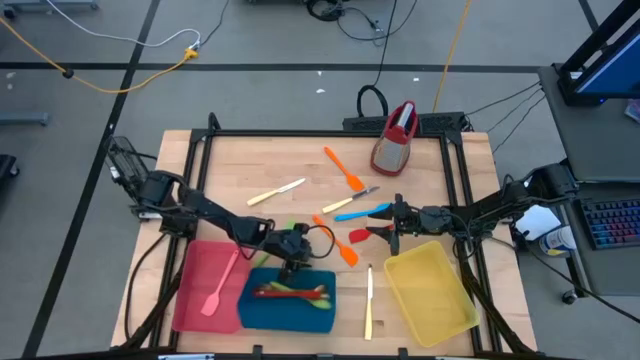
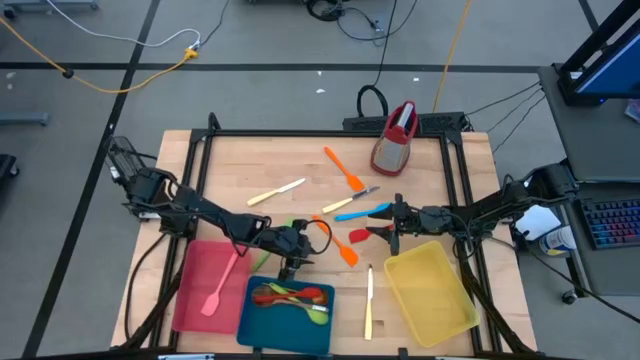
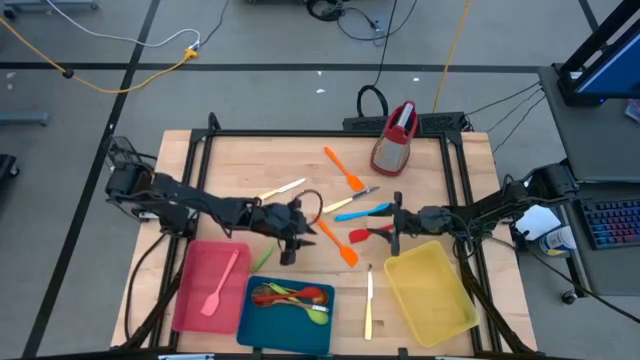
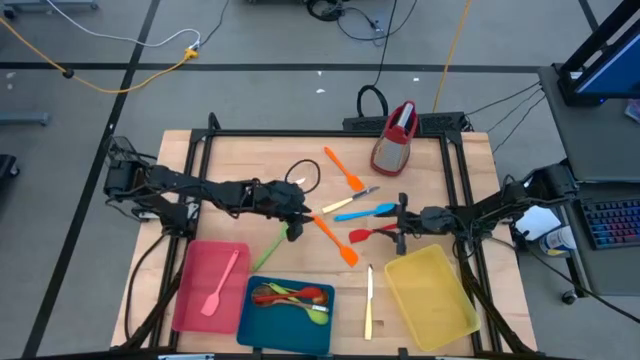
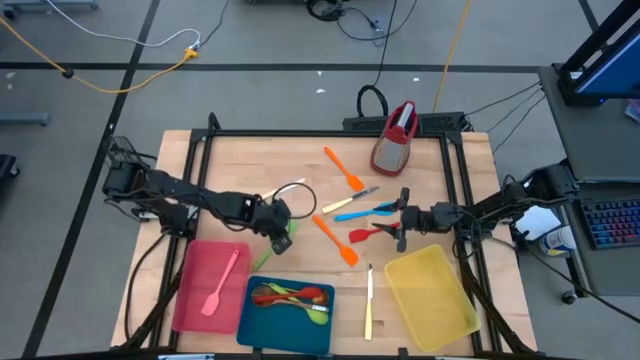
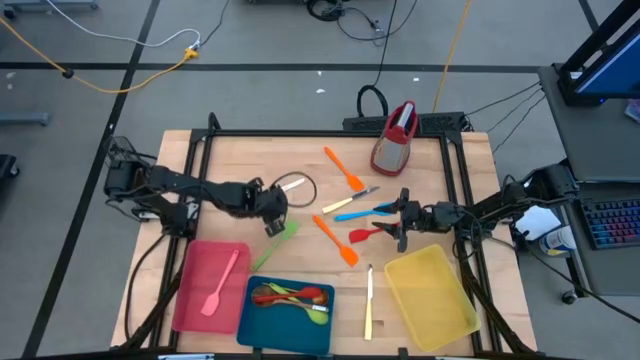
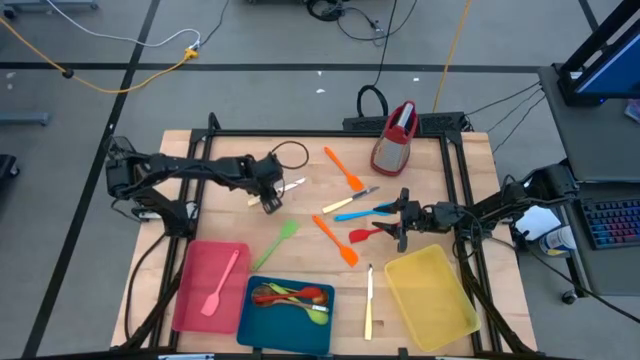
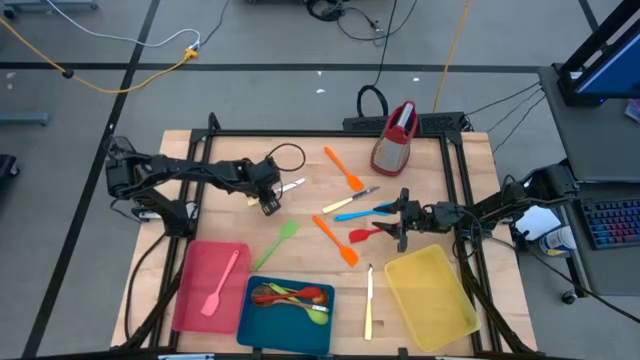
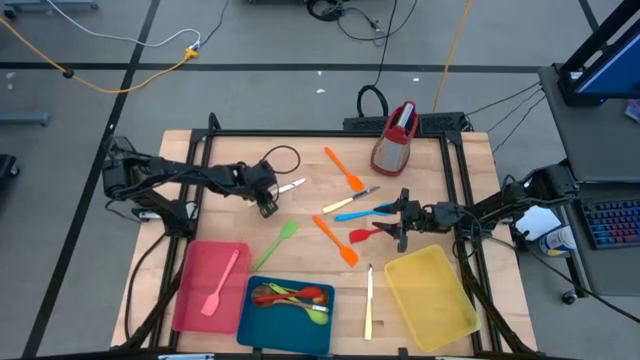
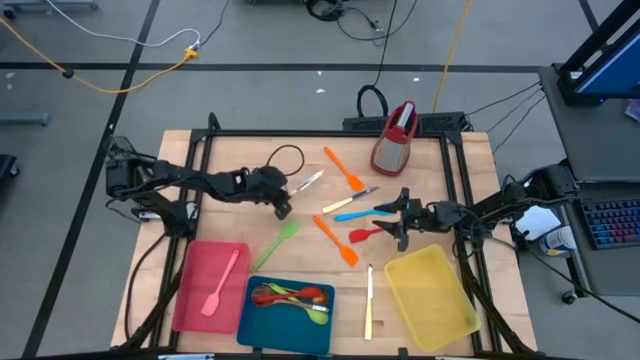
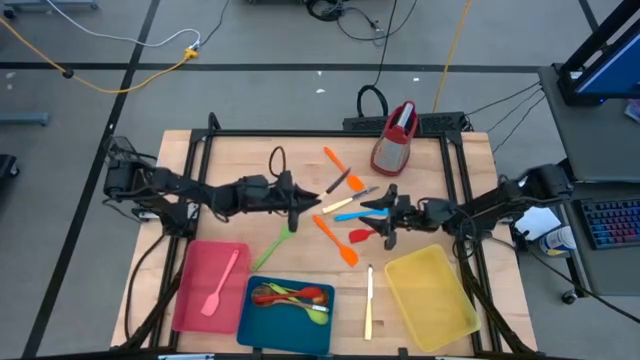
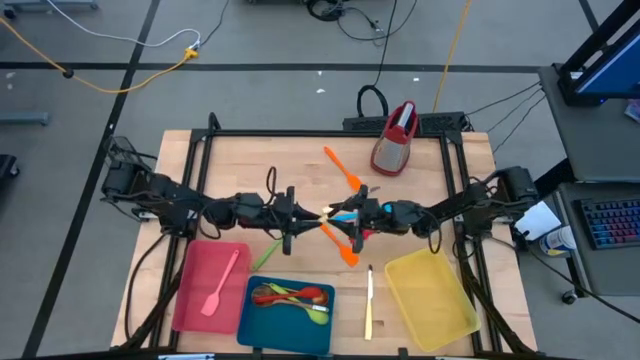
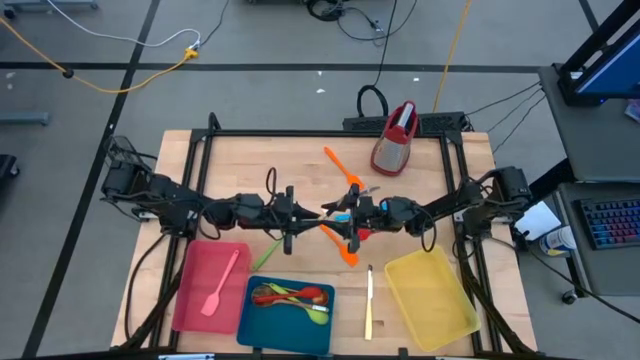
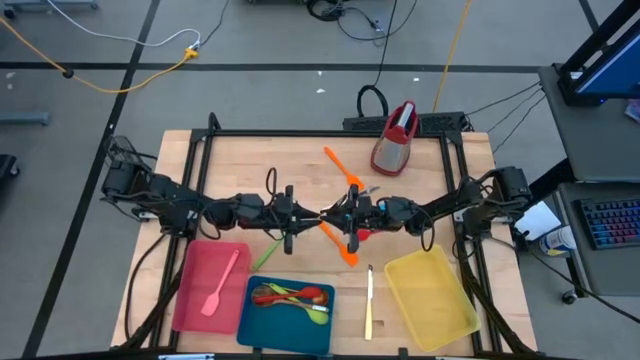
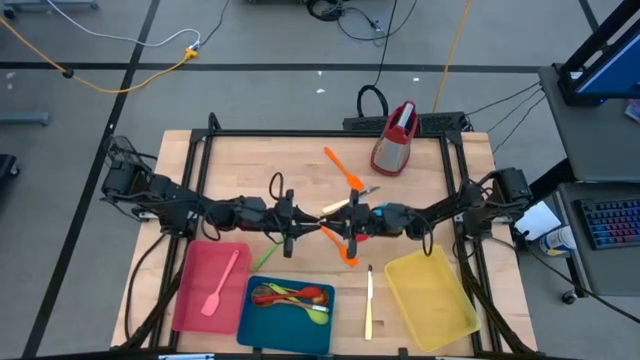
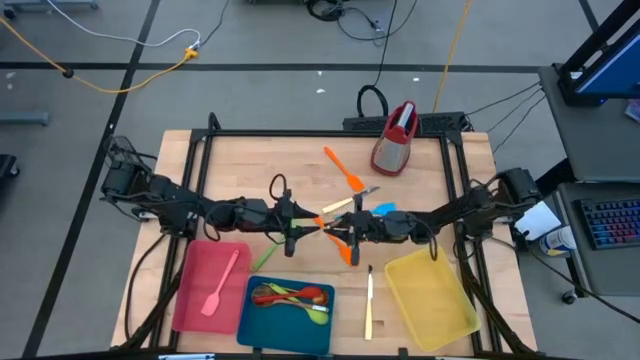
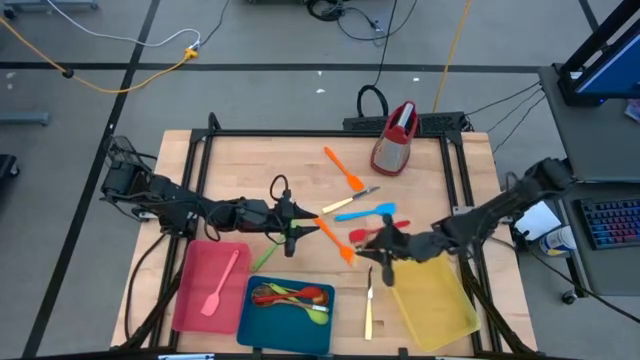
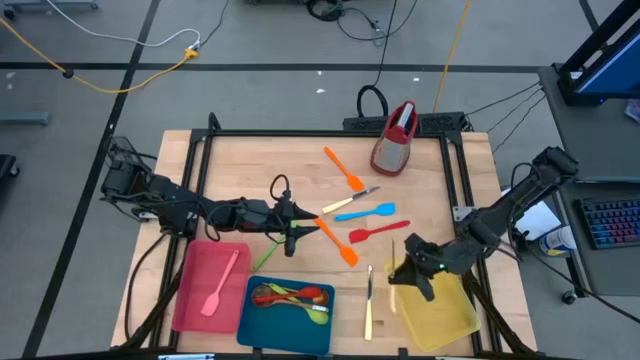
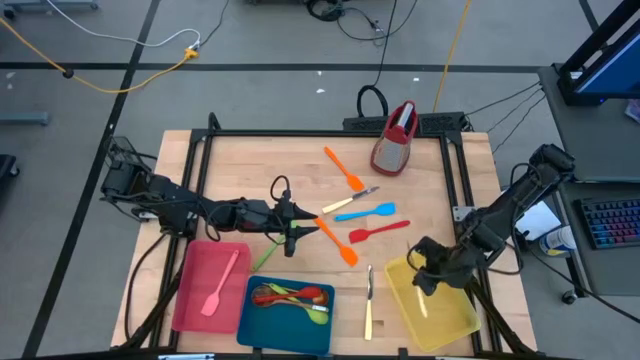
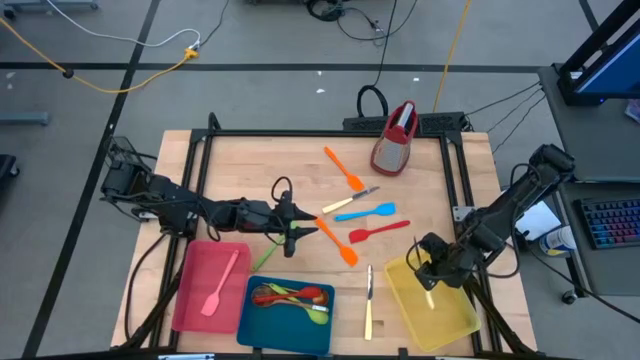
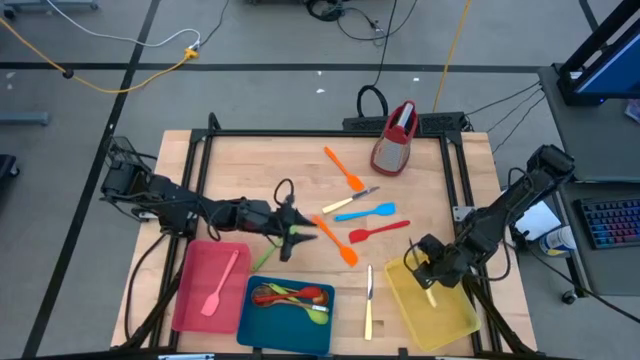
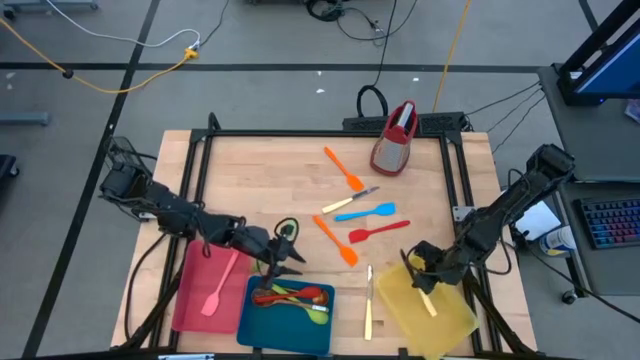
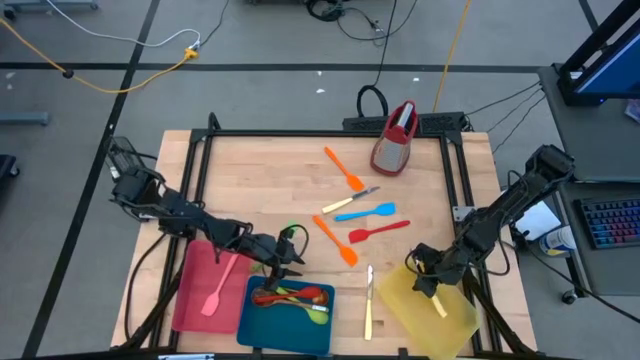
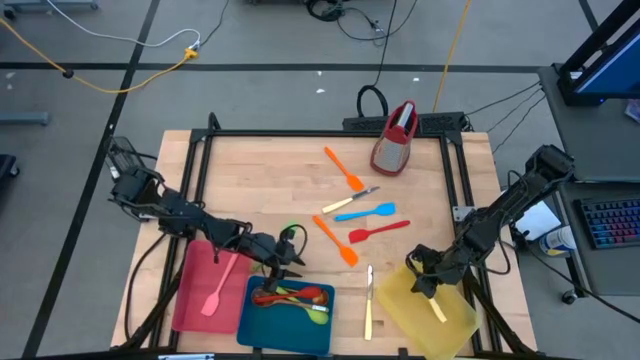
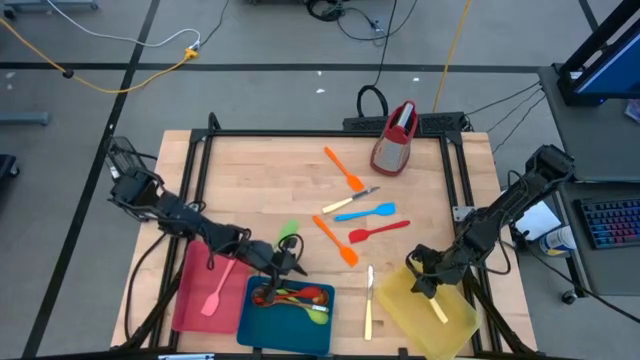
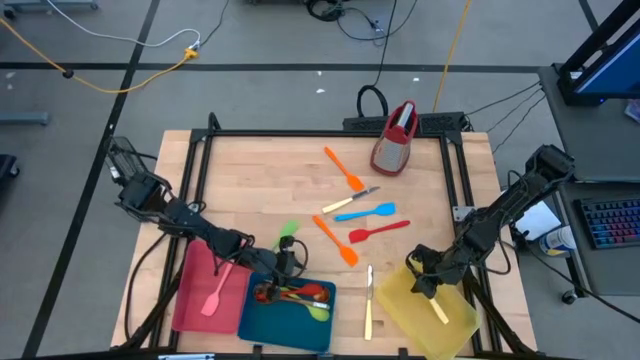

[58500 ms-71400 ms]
Task: Pick & Place Kitchen Items
Put the yellow table knife into the yellow bin

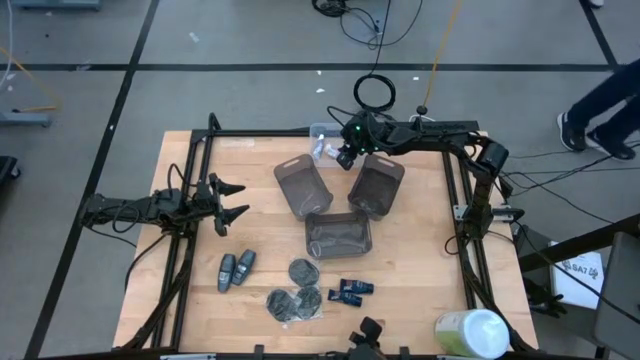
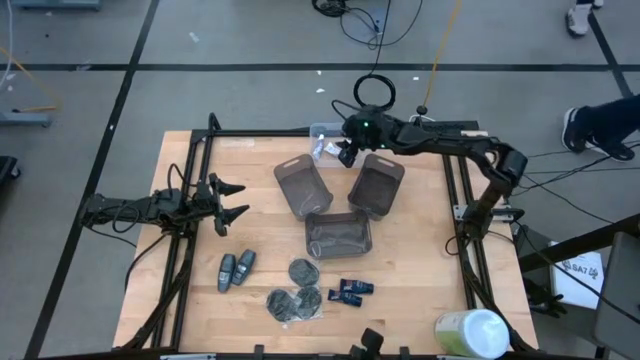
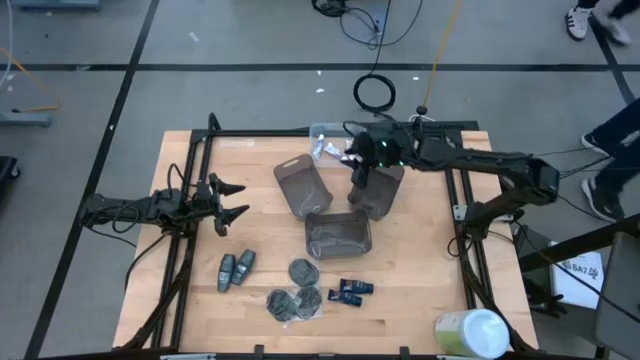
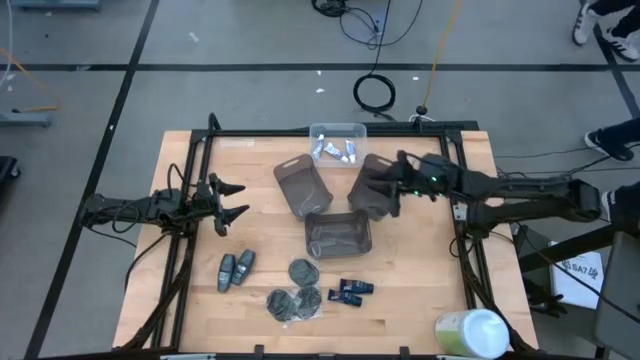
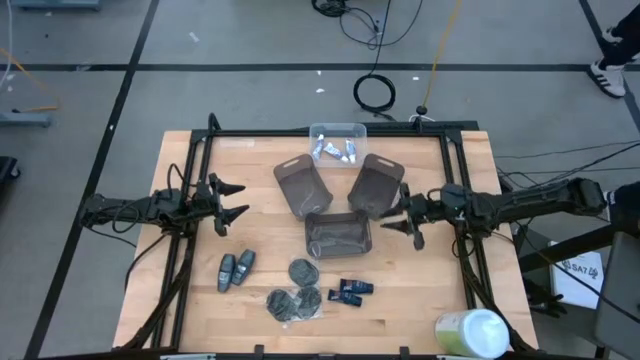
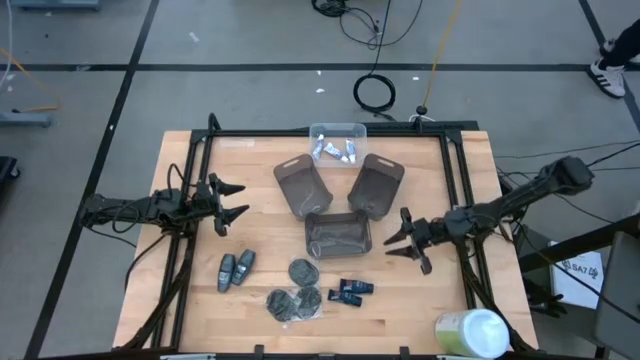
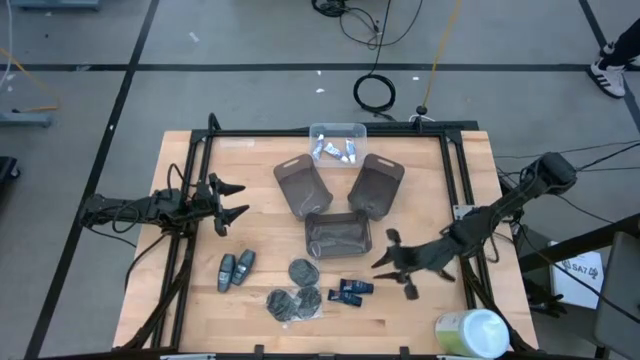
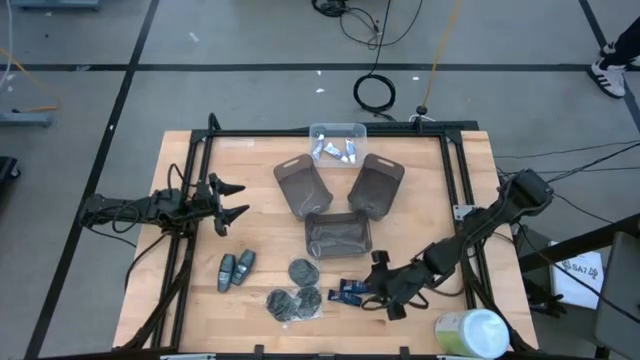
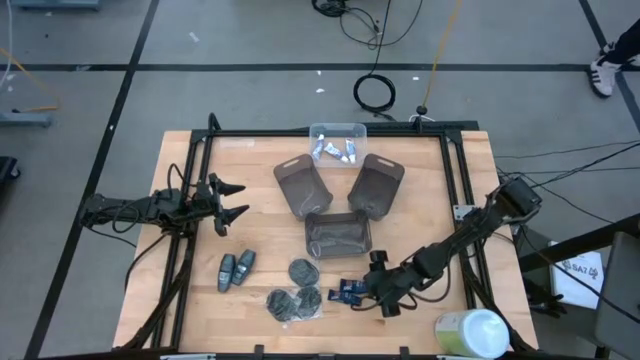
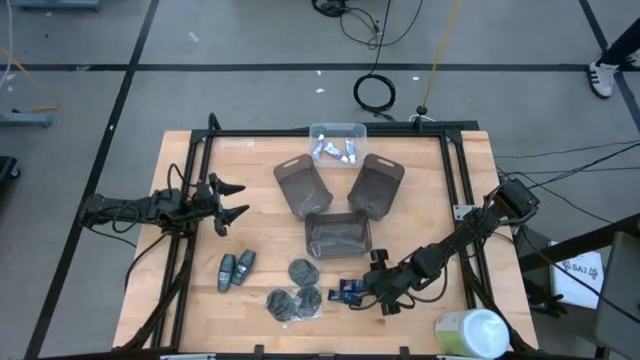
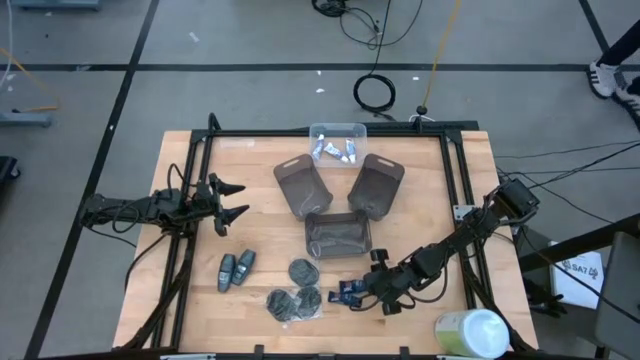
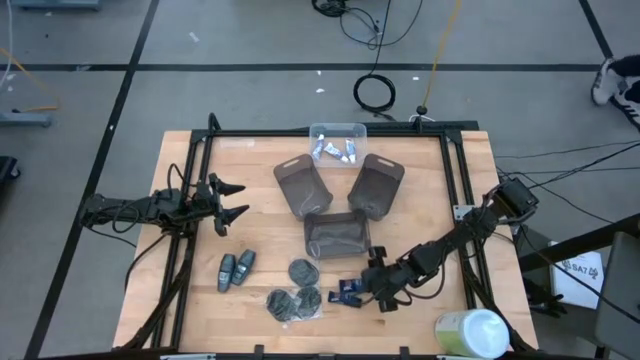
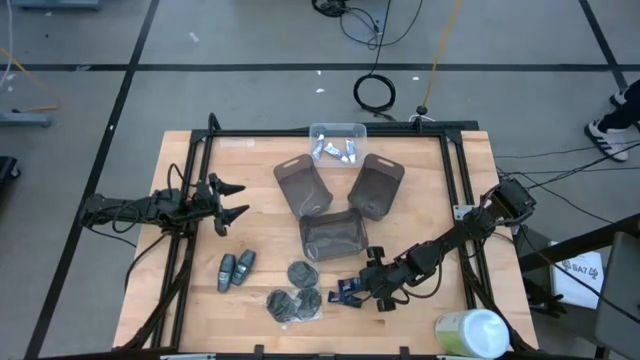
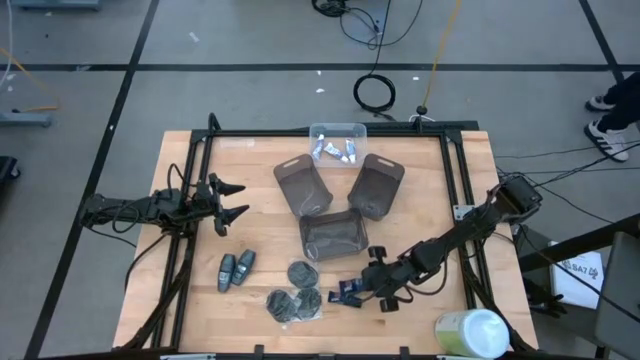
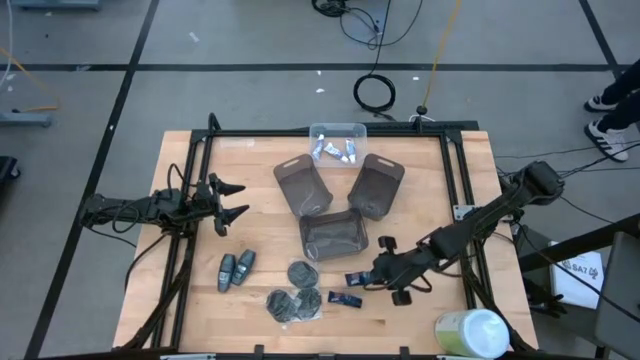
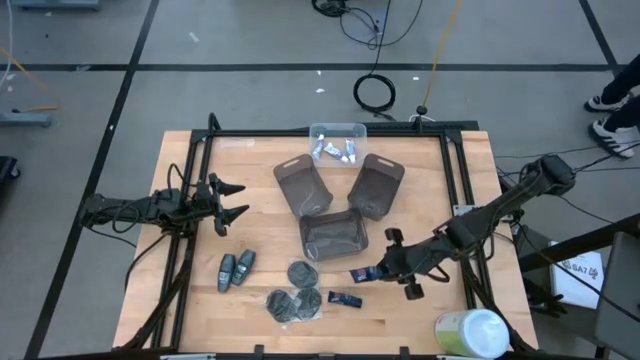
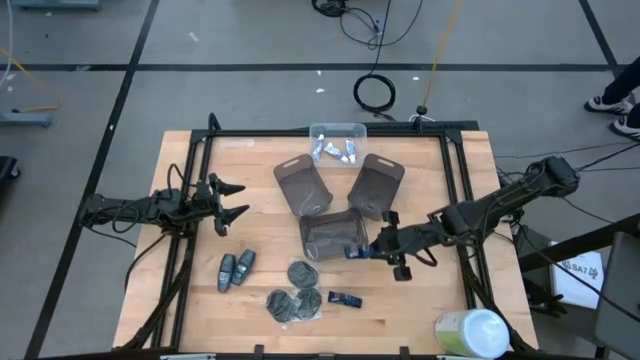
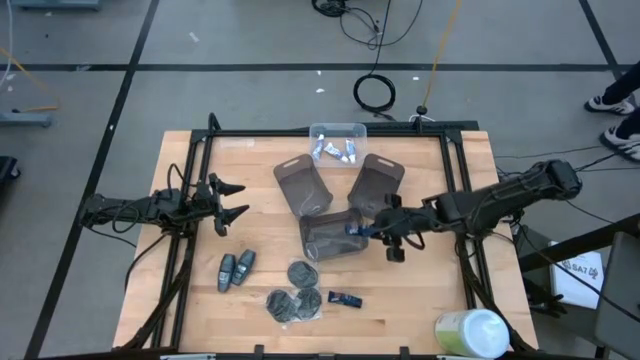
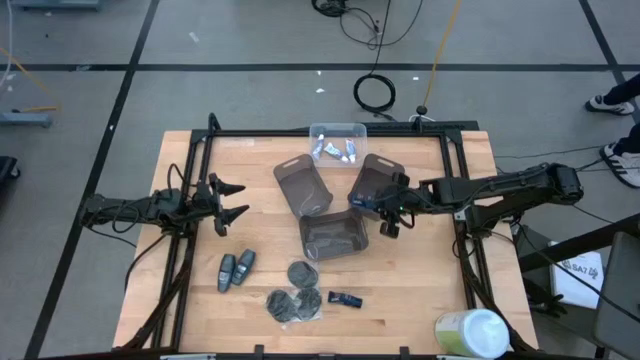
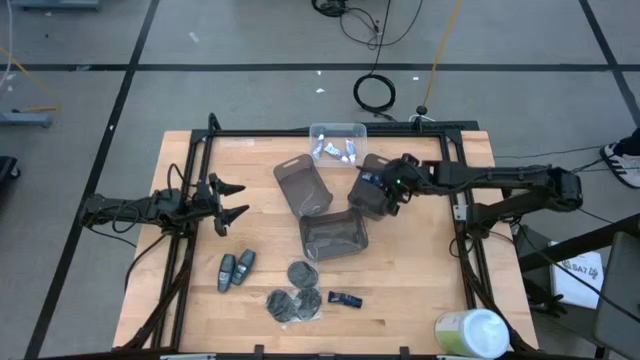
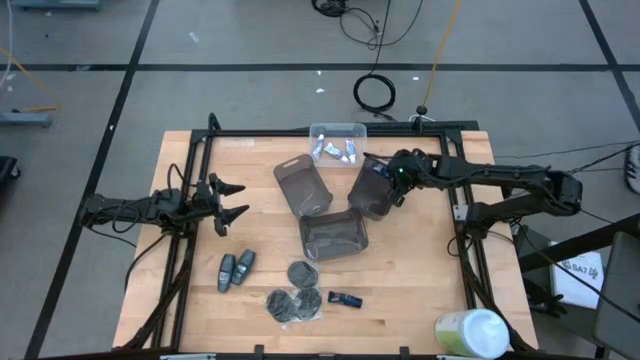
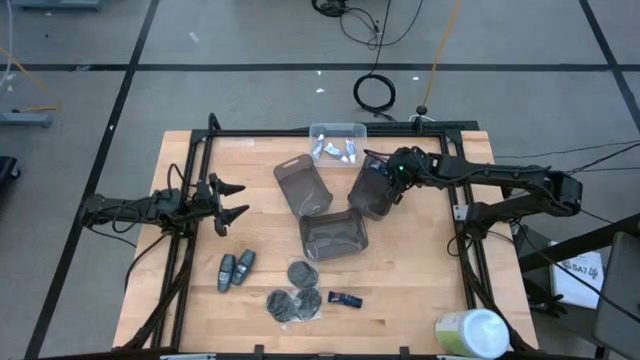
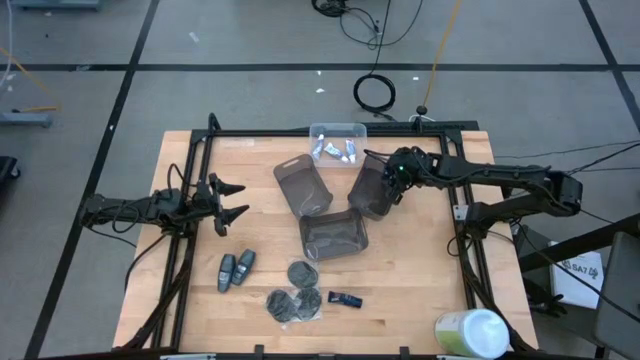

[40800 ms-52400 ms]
Task: Pick & Place Travel size toiletries
Put the top black shave cream into the top right black transparent bin
